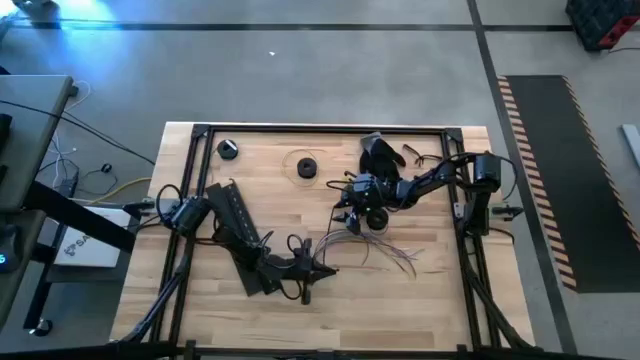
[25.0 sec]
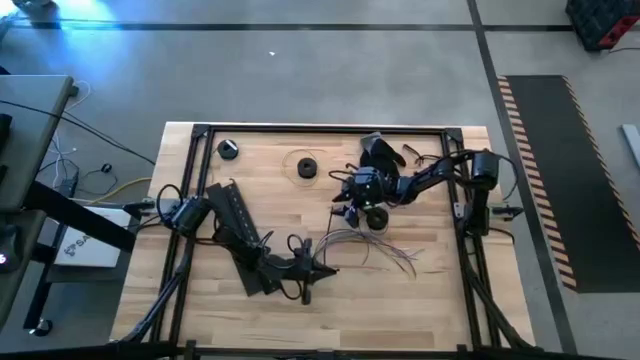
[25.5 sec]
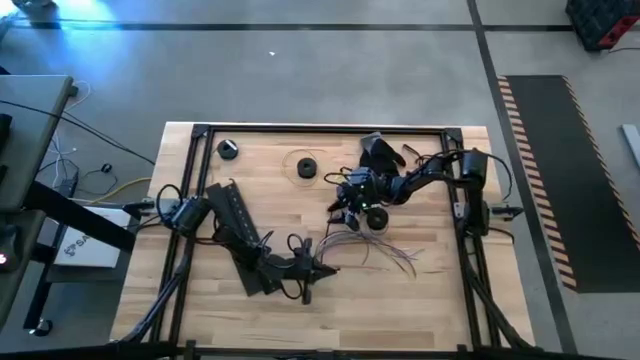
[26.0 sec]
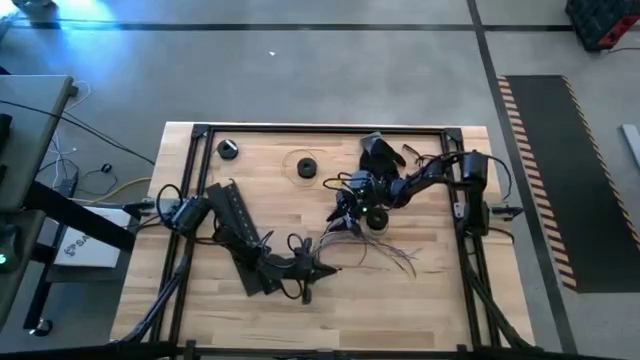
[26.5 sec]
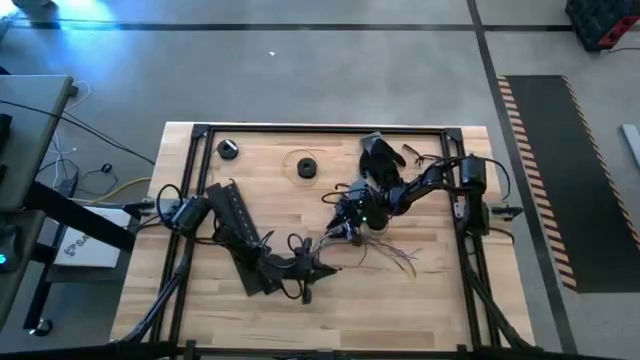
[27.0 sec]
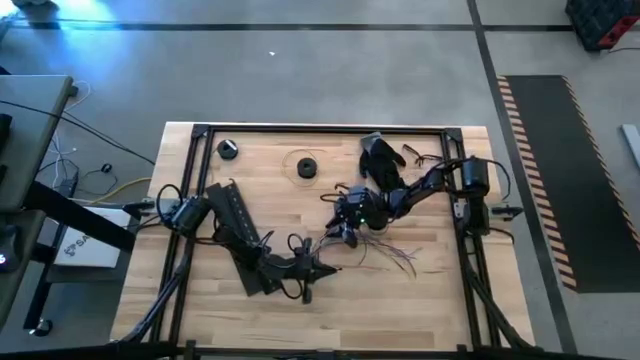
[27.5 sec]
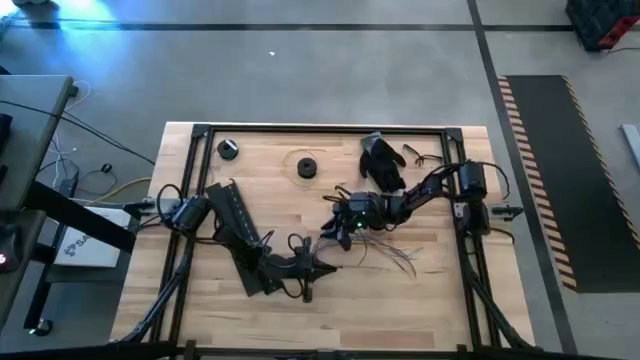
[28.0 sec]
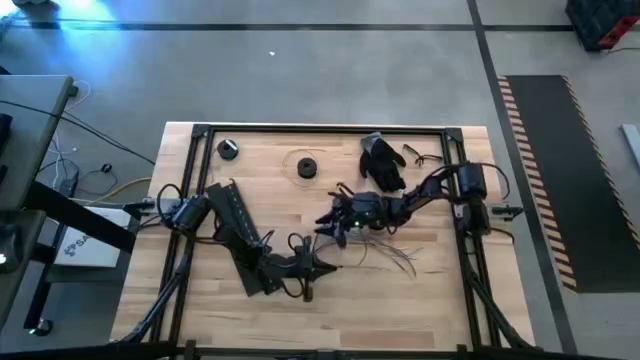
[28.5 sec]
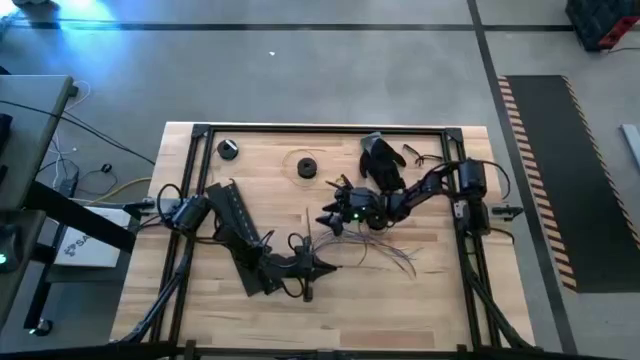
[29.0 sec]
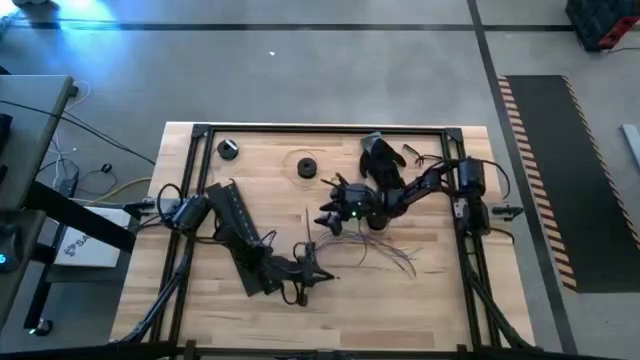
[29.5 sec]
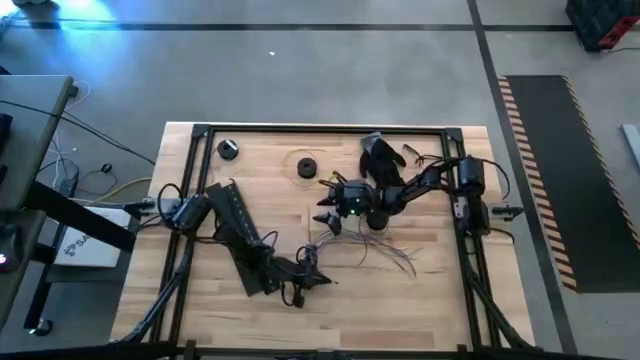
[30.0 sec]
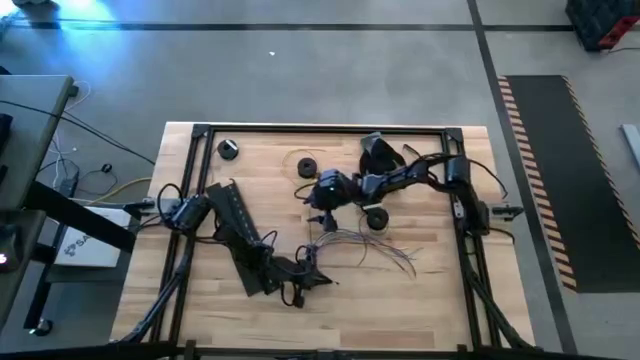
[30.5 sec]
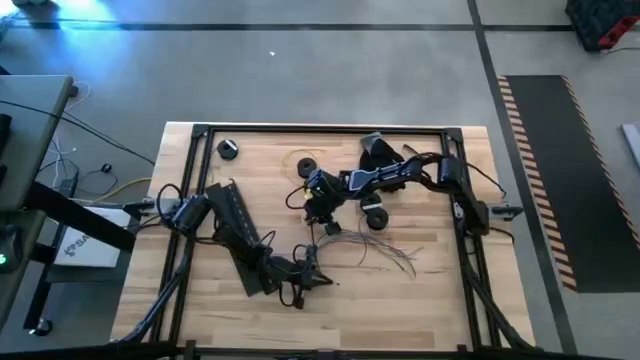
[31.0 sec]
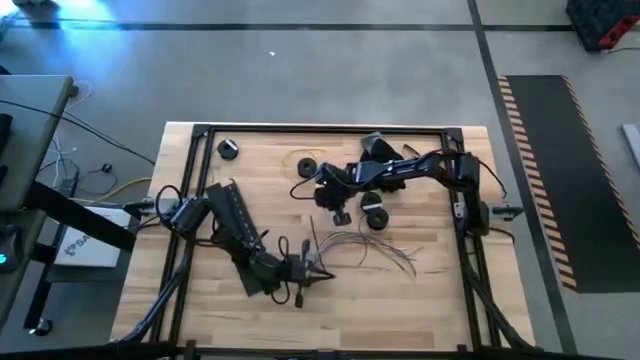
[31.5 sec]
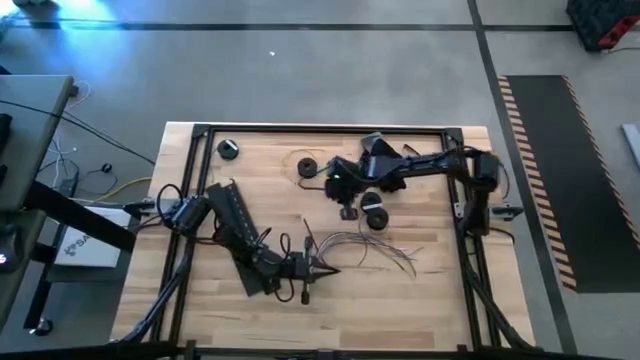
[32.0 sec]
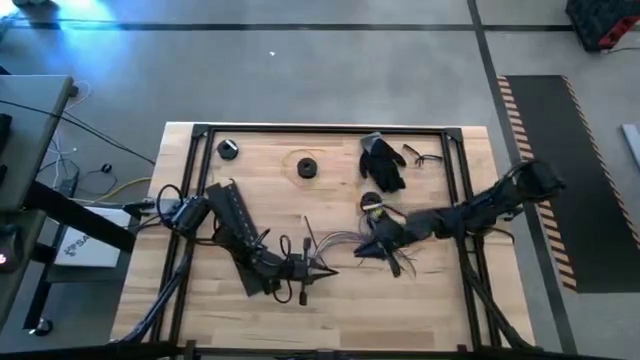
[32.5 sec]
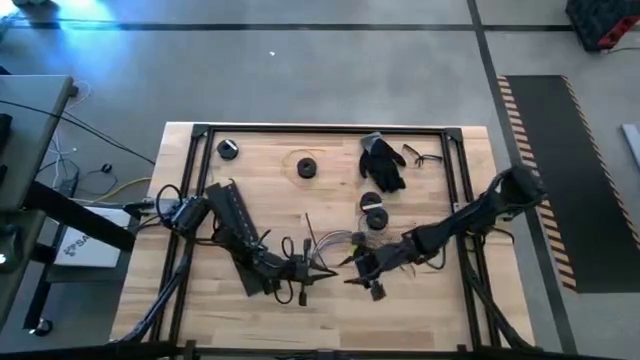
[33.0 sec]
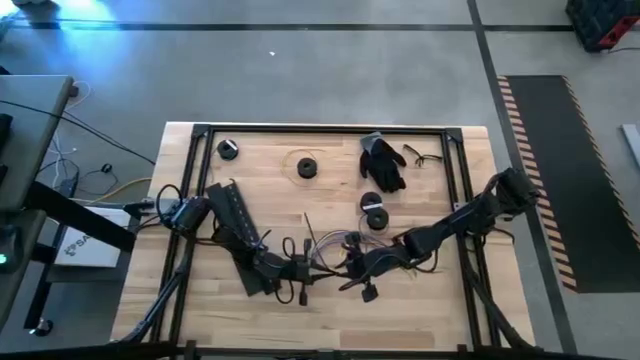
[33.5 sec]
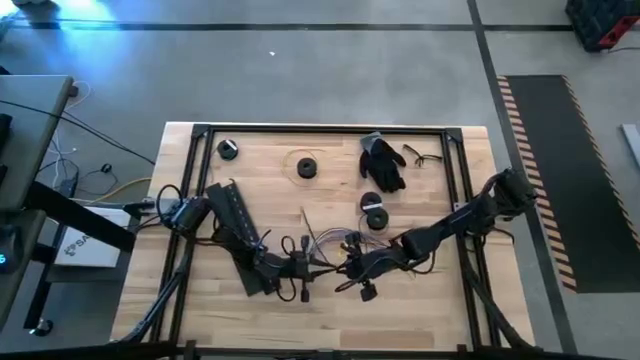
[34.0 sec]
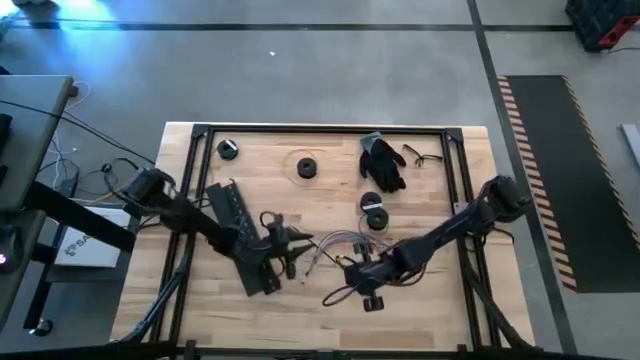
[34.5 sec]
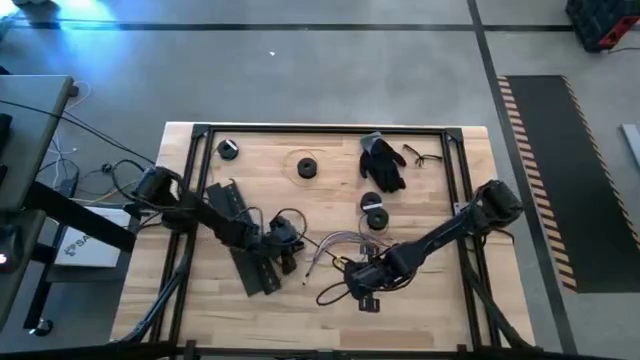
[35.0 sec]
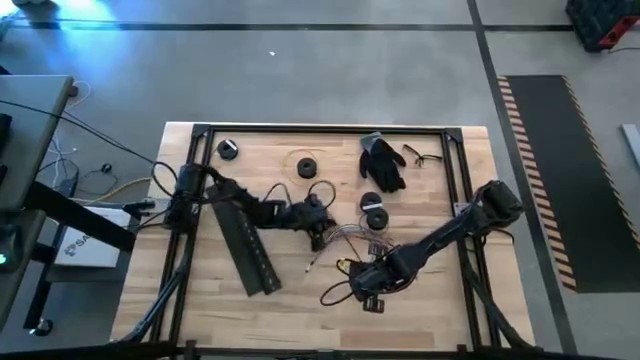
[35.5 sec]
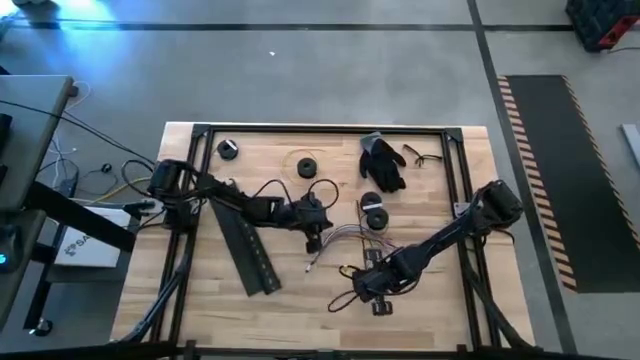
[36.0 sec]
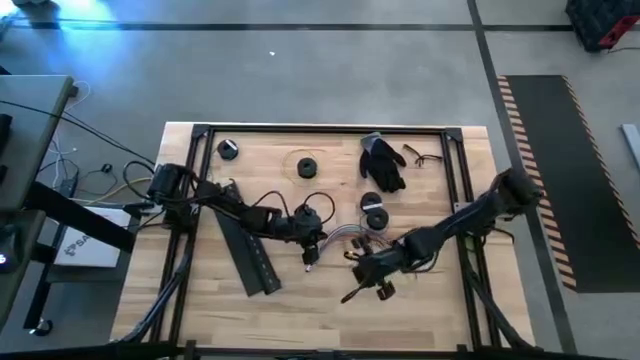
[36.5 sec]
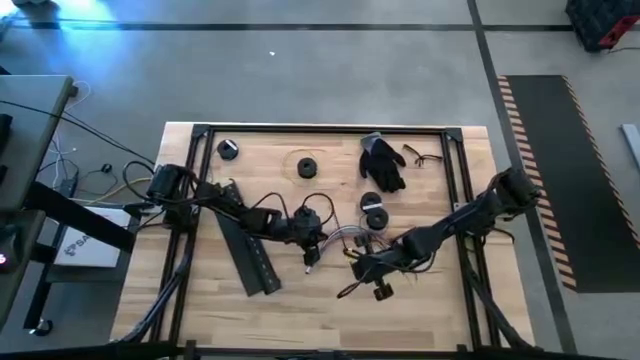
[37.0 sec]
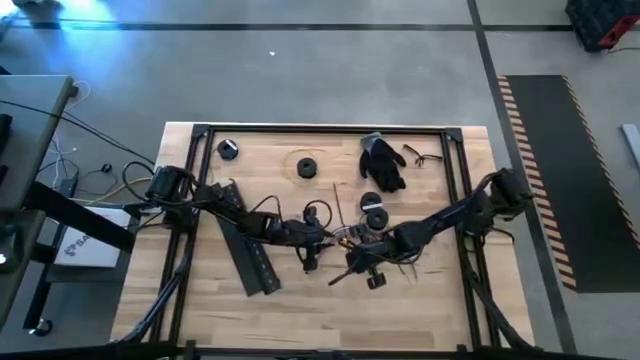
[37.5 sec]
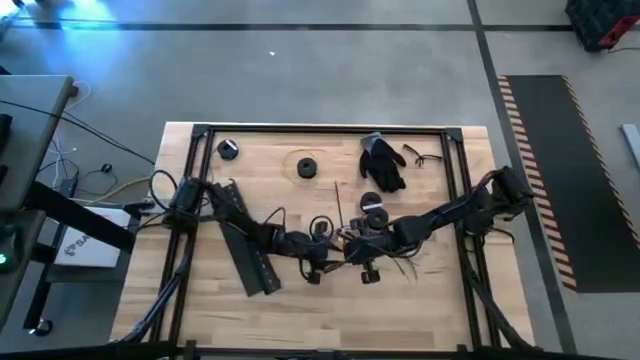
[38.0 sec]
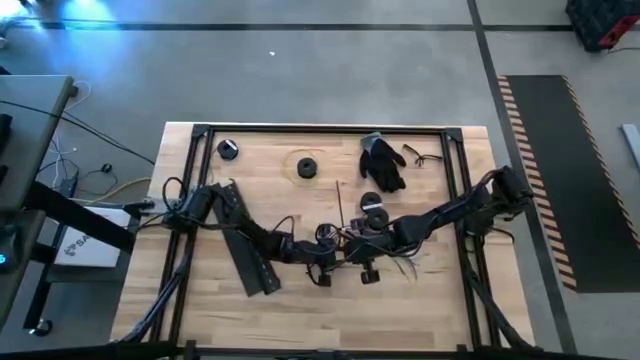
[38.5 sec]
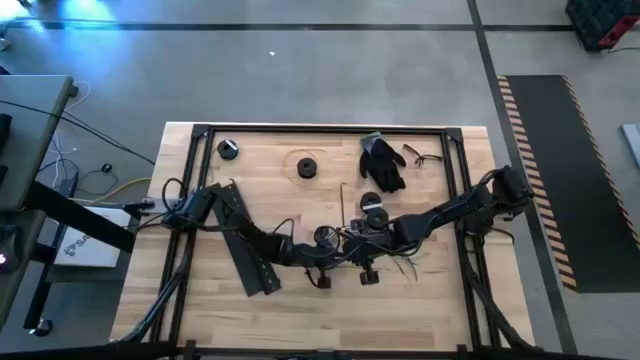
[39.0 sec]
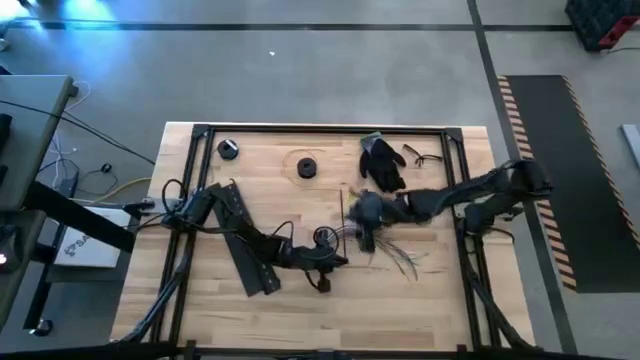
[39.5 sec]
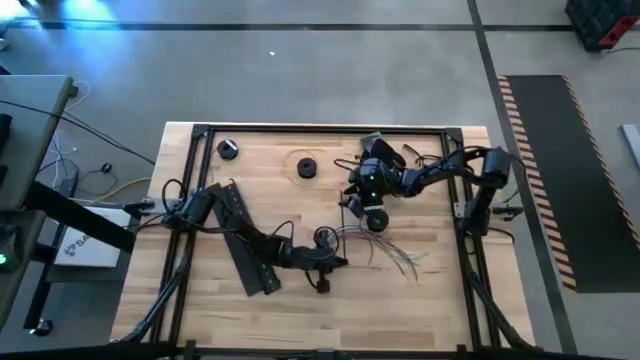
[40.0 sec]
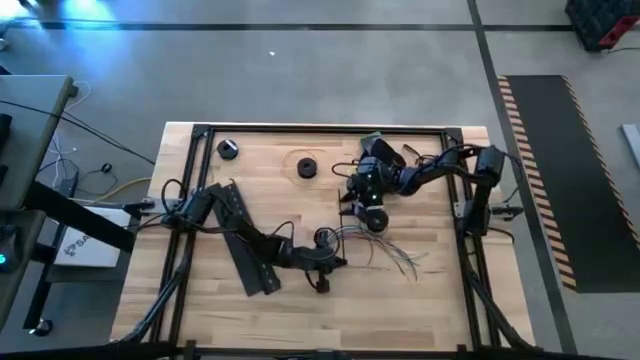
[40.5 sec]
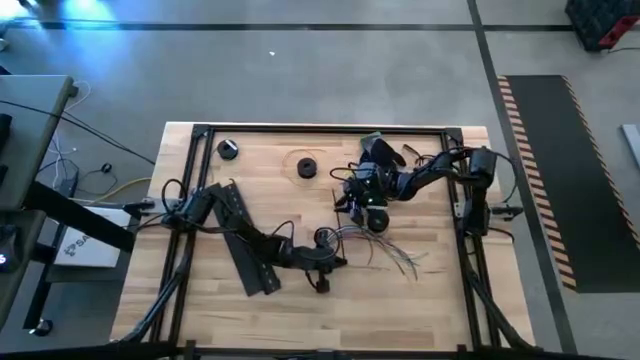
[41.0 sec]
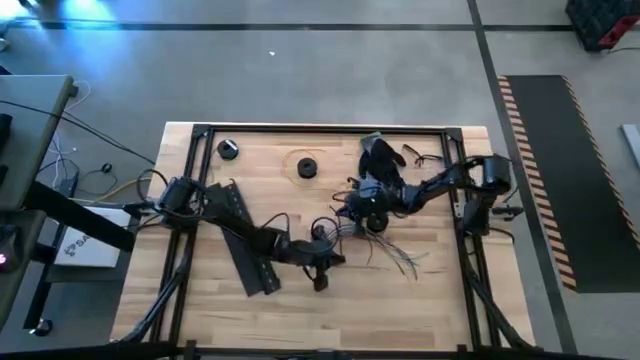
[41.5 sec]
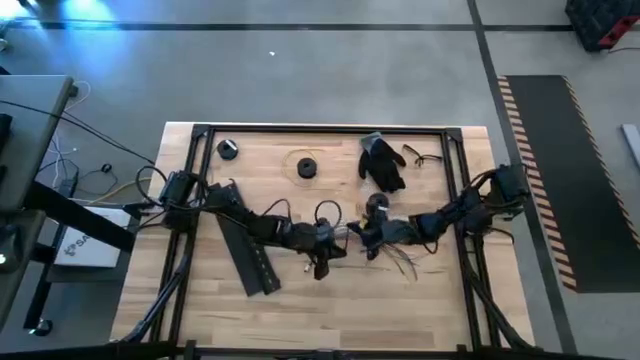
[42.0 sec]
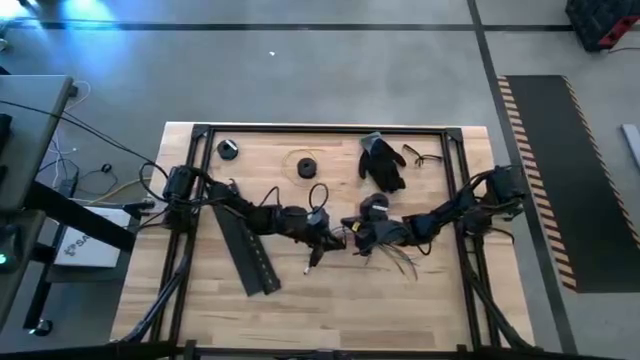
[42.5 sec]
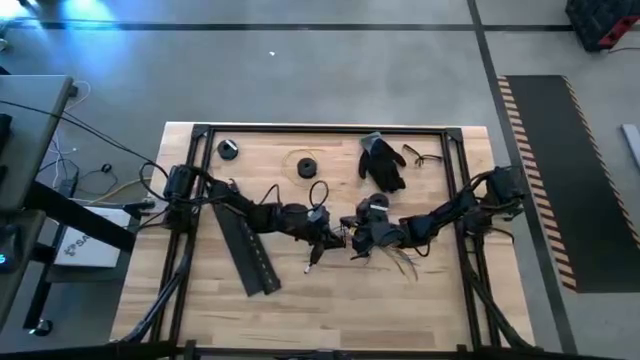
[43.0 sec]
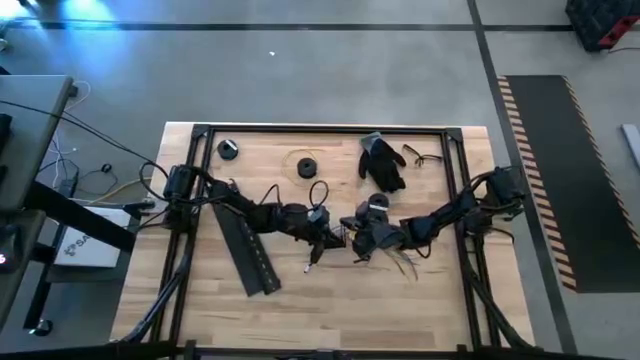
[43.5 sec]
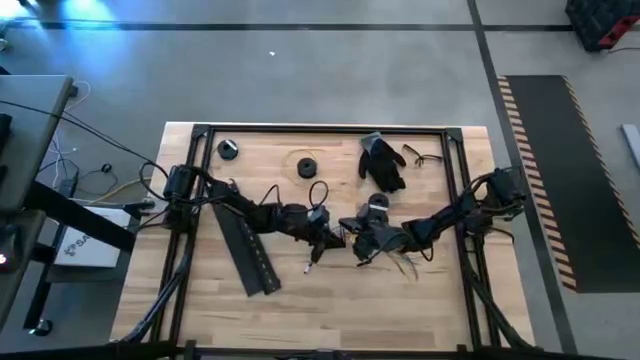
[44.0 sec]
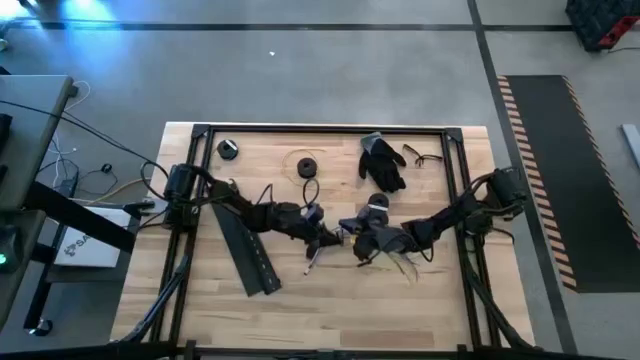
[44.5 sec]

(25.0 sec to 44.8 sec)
Task: Ziptie cables
Wrap the cables together using a black zip tie
